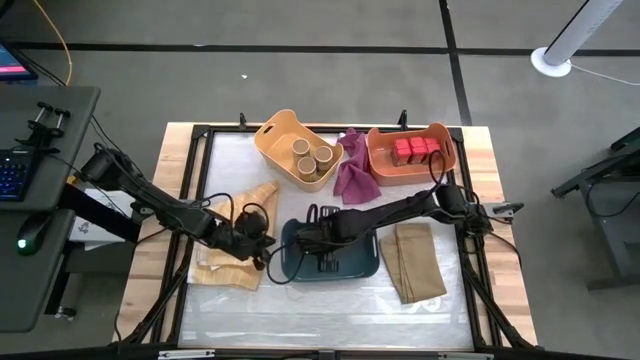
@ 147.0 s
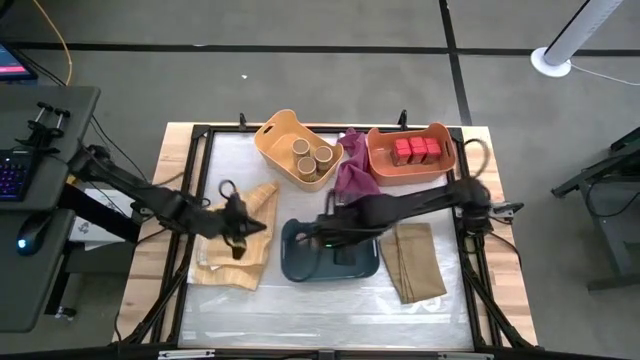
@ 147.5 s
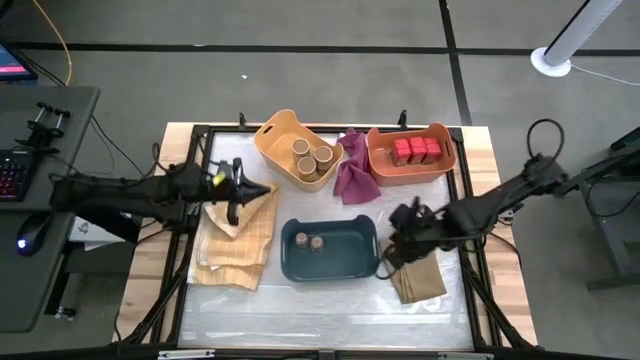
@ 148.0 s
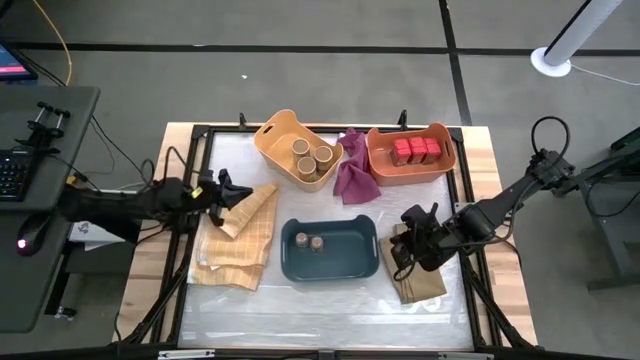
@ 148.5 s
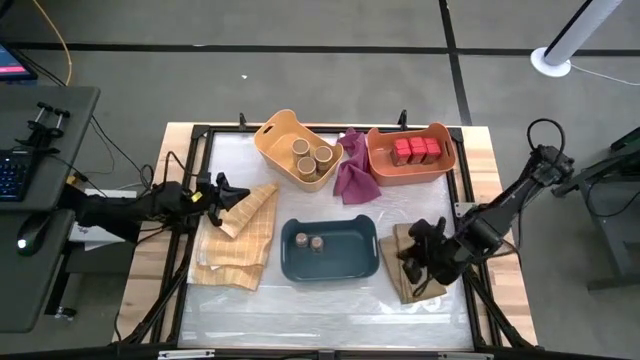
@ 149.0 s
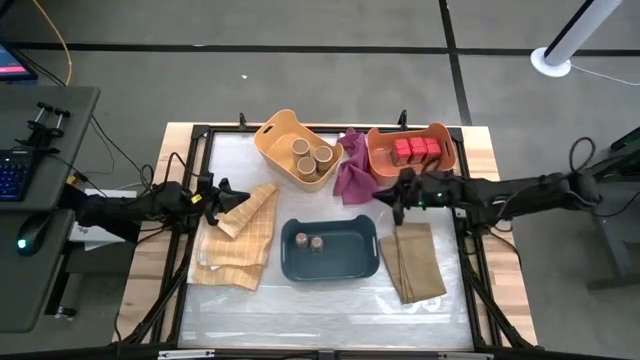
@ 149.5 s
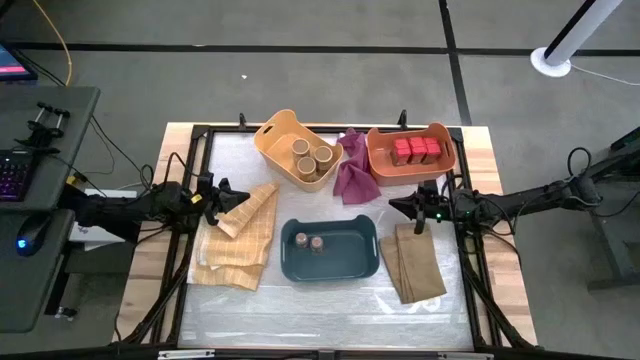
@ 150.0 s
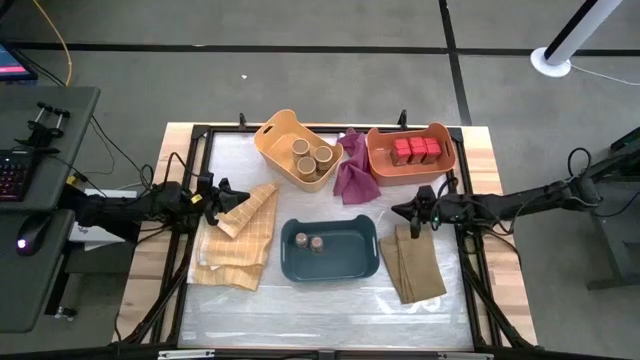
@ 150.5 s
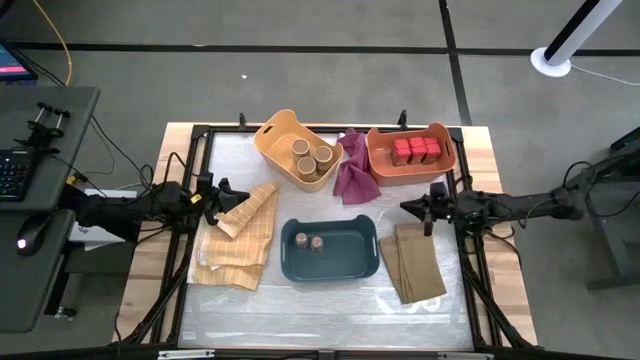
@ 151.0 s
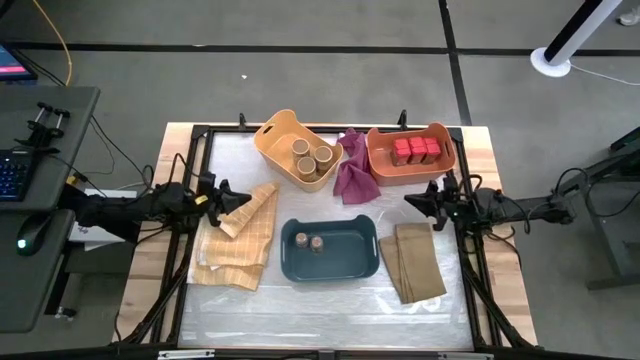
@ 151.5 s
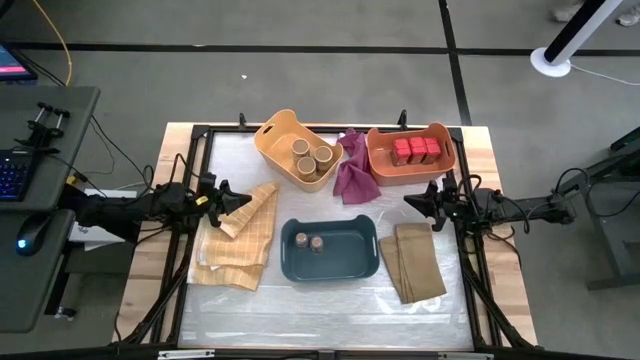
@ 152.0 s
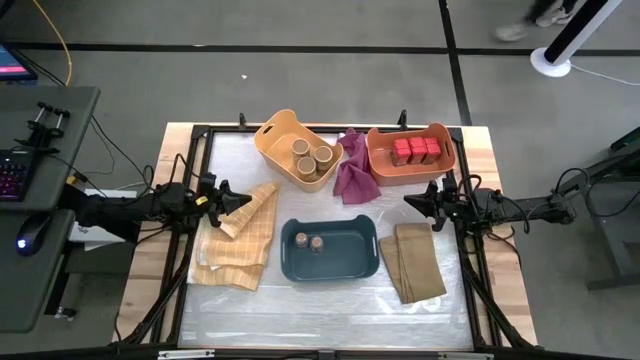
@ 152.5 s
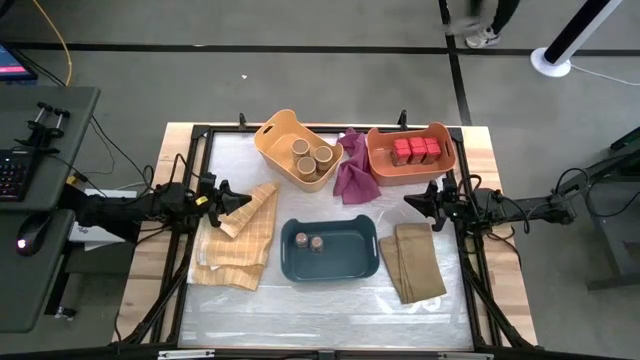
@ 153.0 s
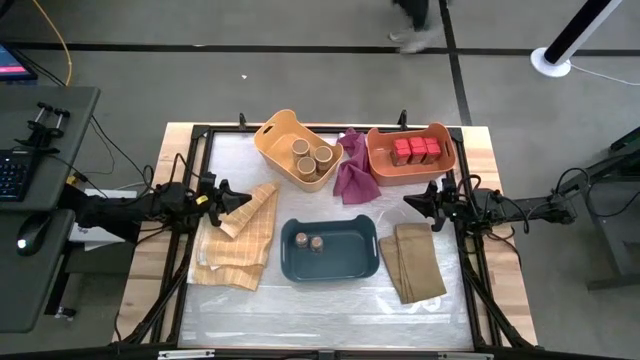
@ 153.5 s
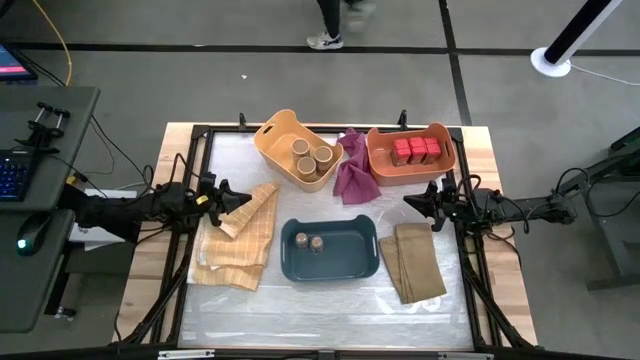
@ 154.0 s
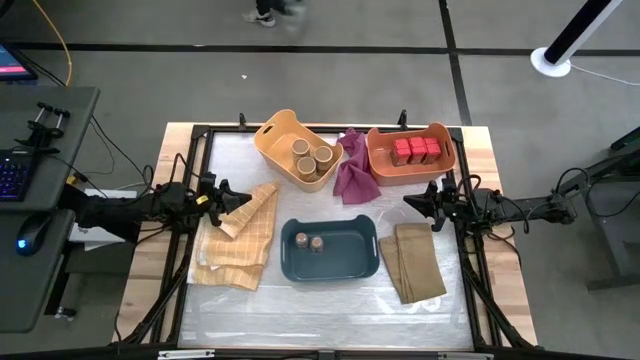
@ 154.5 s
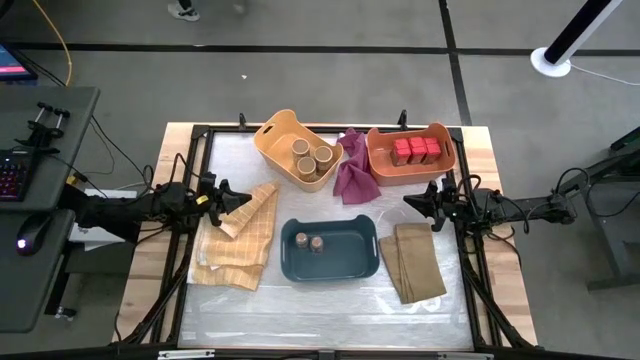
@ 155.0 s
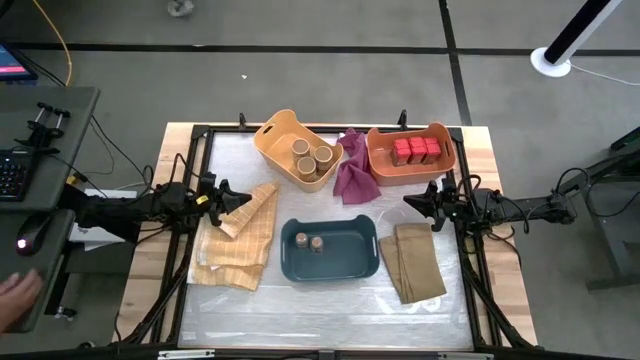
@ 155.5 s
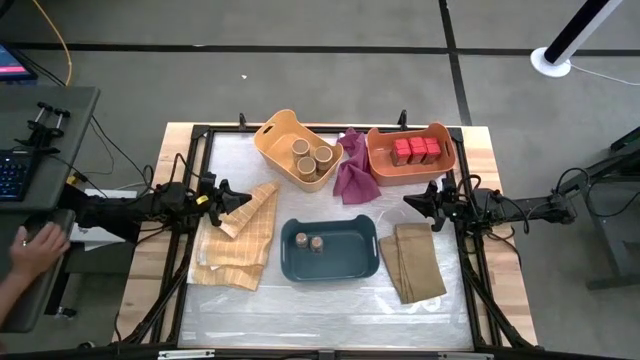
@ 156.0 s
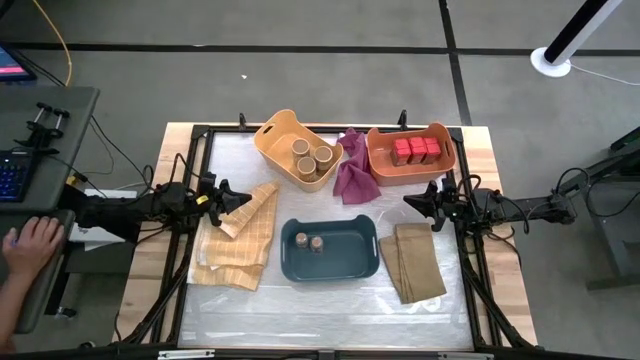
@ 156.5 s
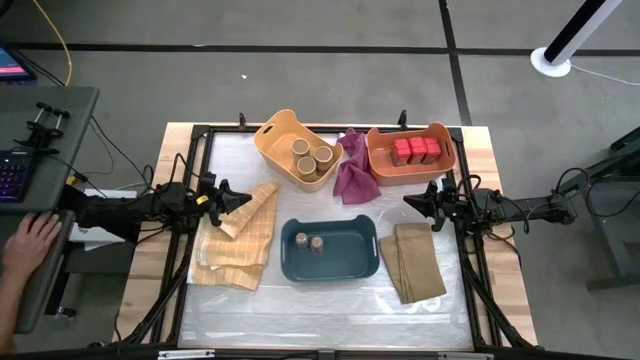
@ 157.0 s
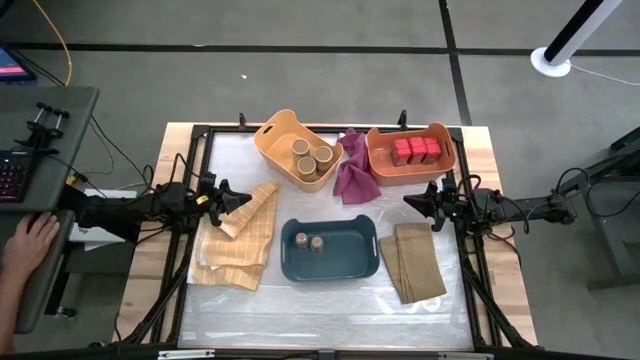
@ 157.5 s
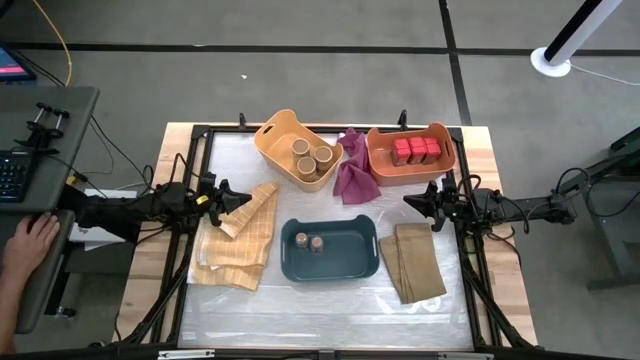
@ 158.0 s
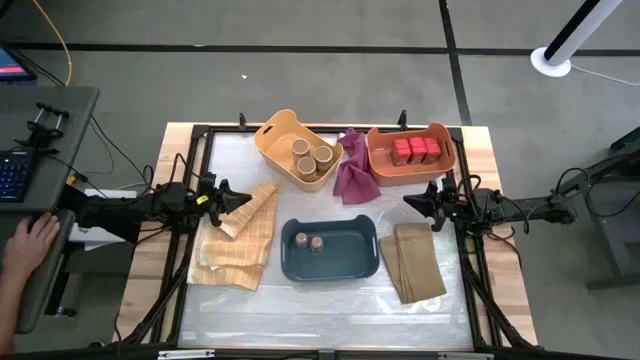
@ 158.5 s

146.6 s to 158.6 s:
Task: Sort spices by type
Return to Home Position

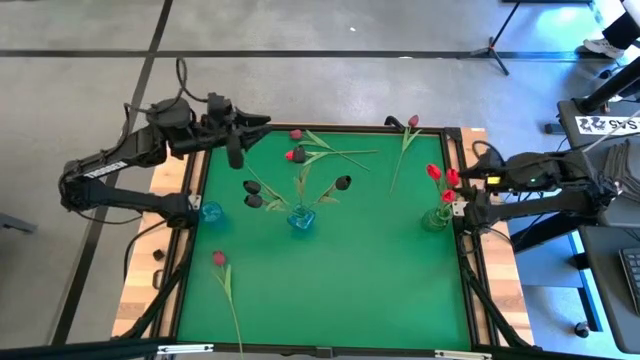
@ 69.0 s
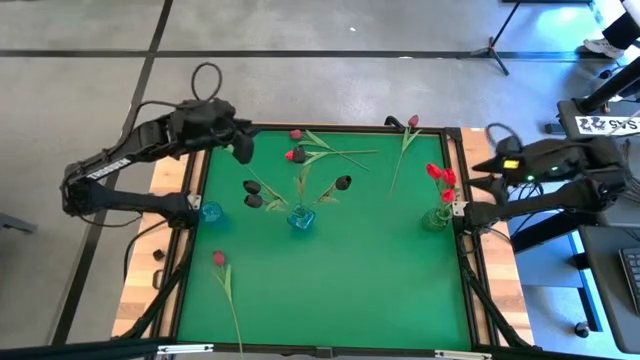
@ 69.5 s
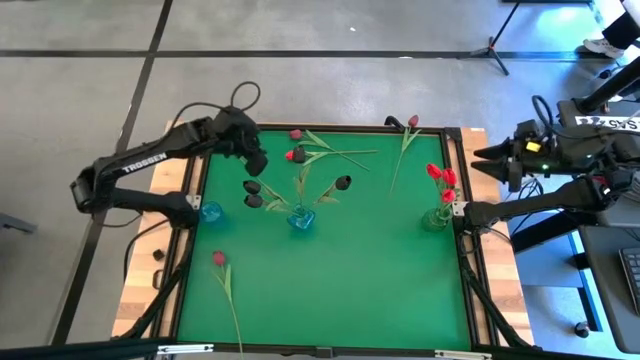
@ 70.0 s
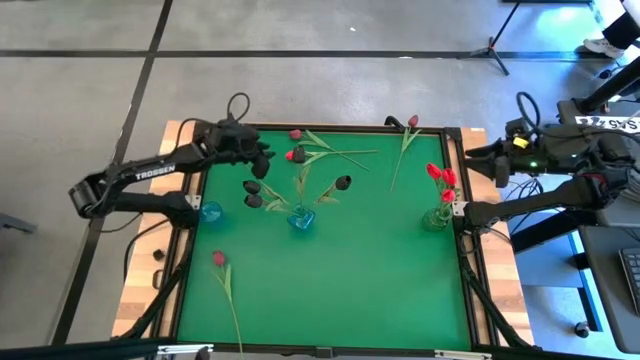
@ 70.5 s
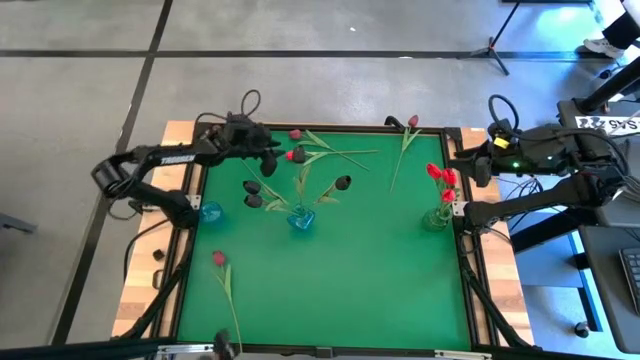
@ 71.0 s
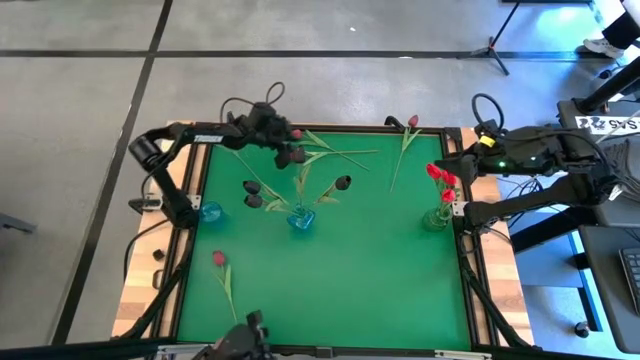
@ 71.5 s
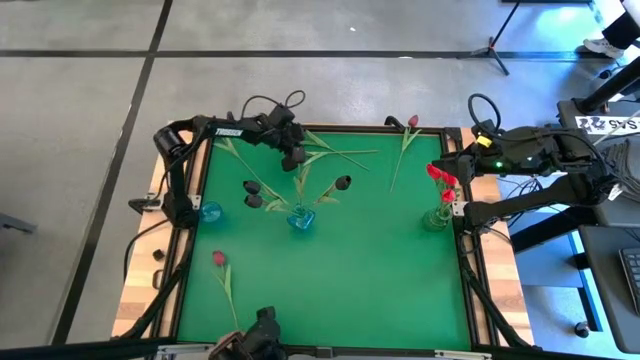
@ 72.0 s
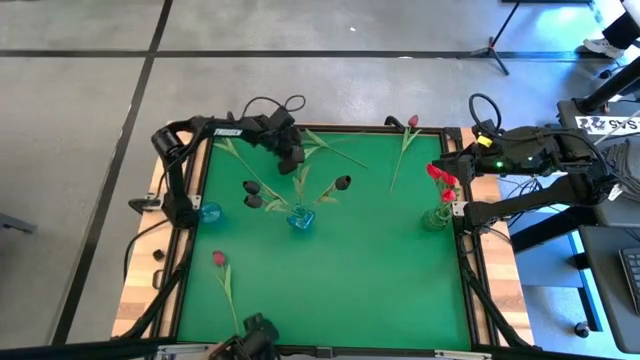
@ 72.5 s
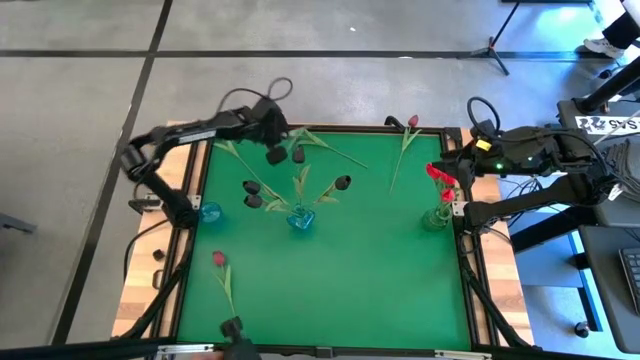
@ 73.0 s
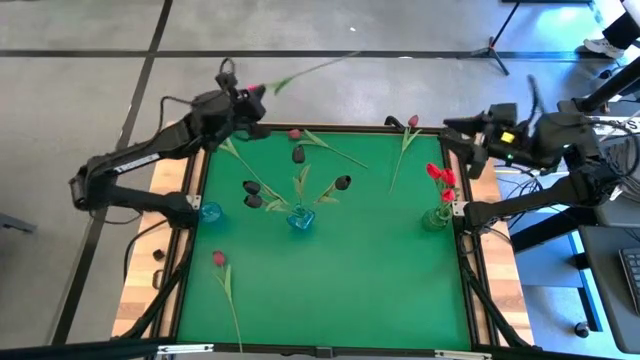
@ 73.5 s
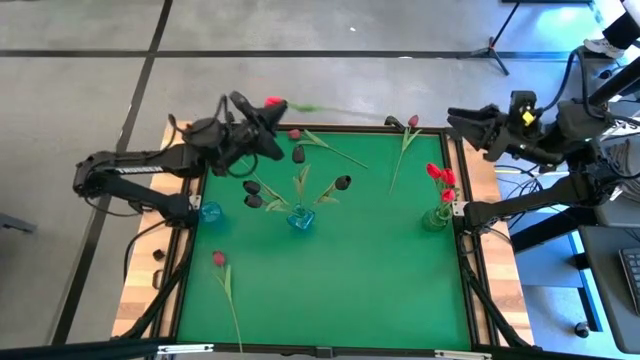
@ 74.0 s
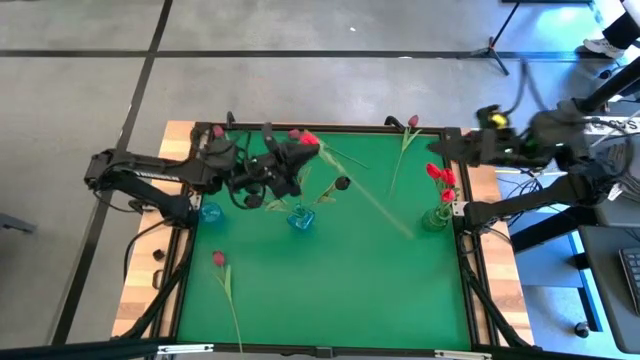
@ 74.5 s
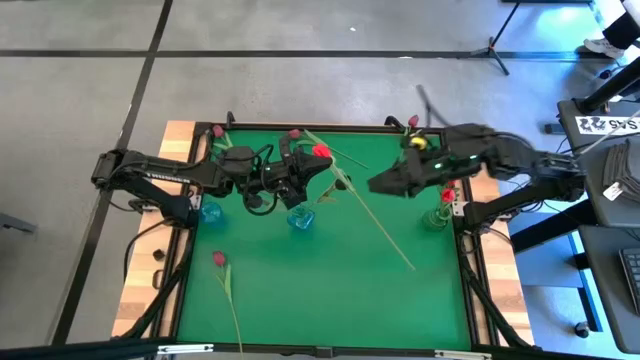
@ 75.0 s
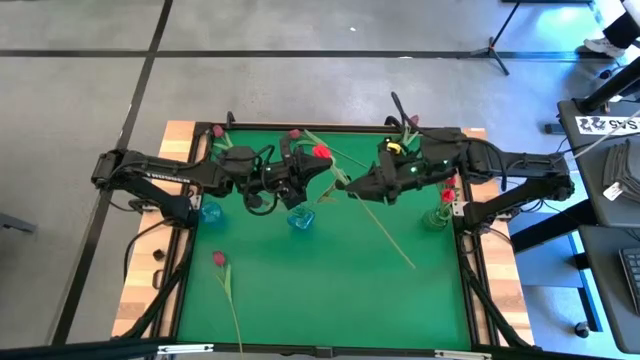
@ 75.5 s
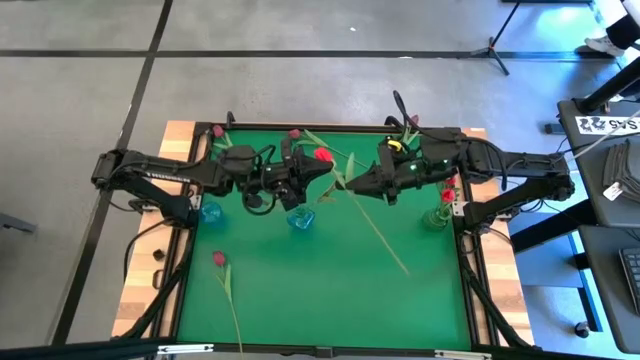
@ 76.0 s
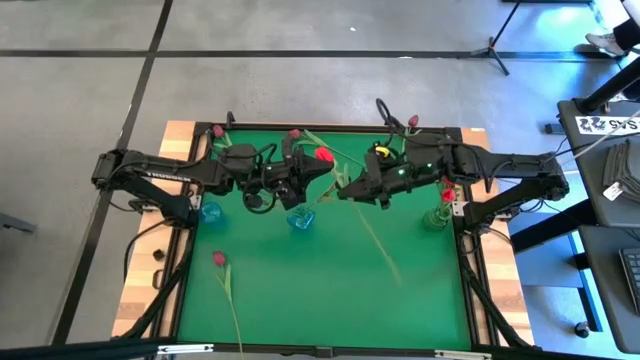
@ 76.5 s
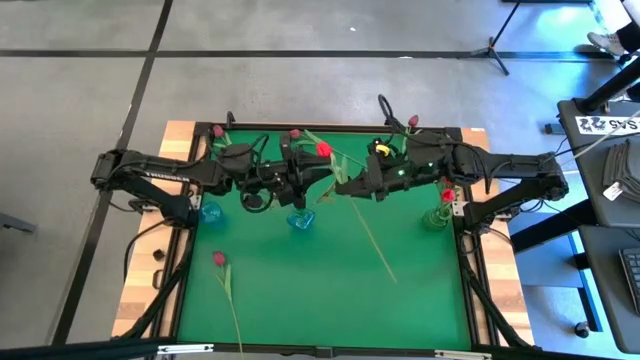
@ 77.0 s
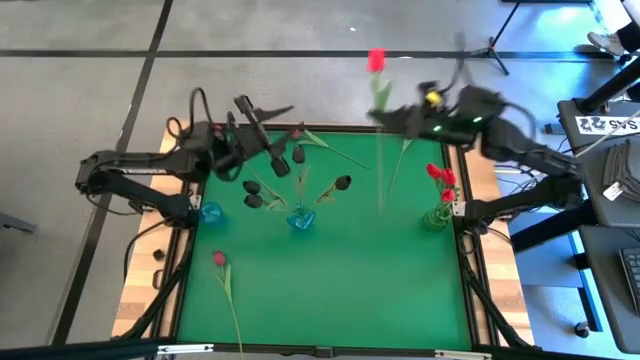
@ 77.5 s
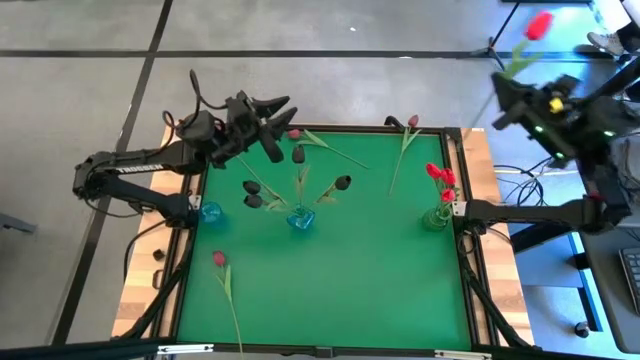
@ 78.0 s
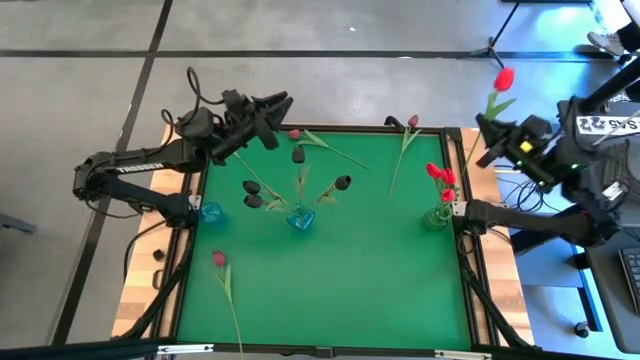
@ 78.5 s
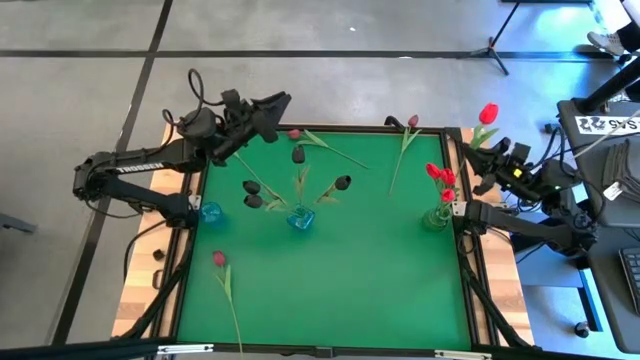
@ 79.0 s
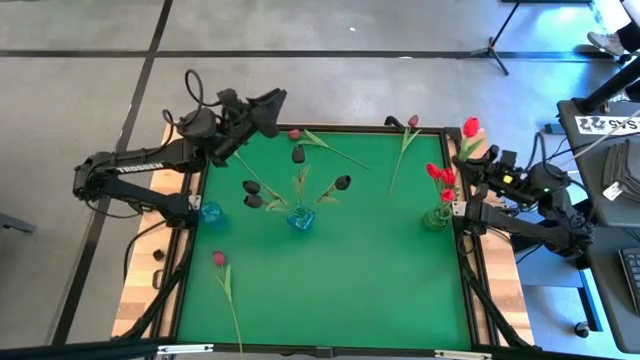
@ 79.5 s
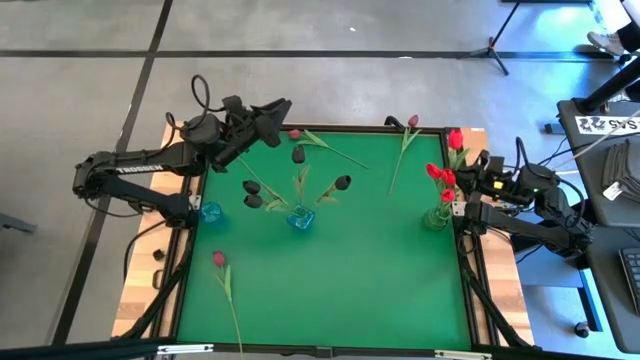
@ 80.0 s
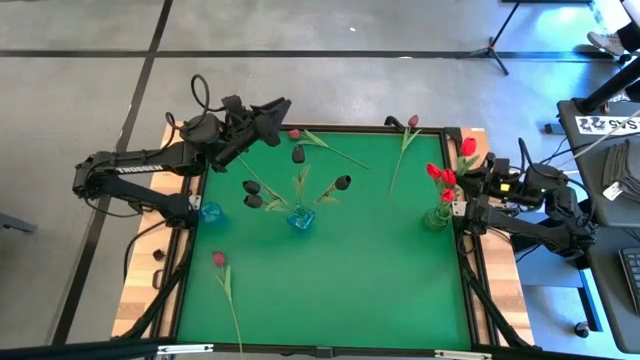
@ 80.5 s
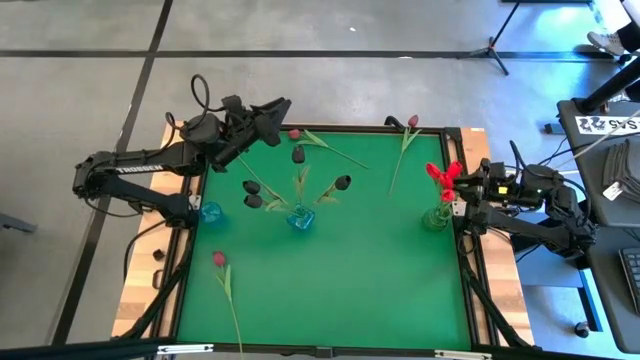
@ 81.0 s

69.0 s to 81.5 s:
Task: Sort flowers into vase by color
Put the red tulip into the green vase
